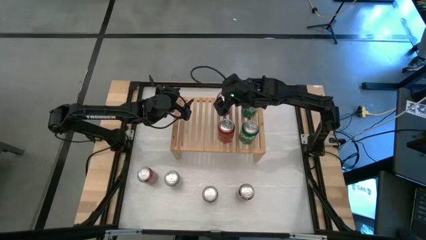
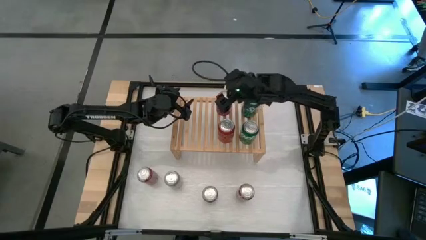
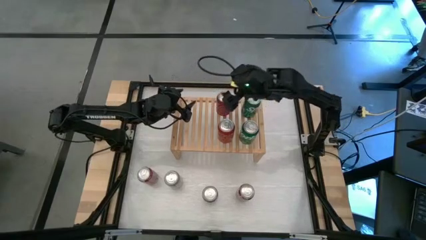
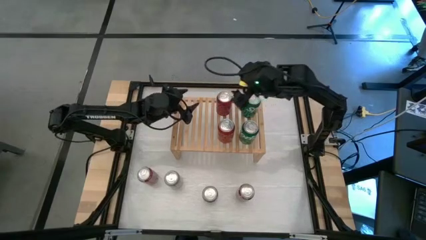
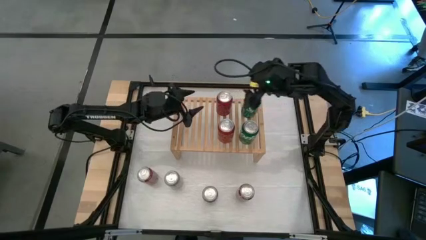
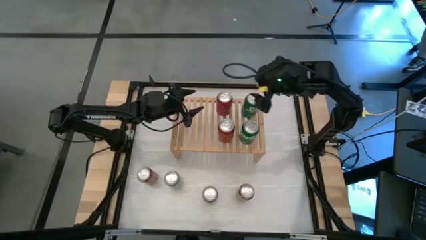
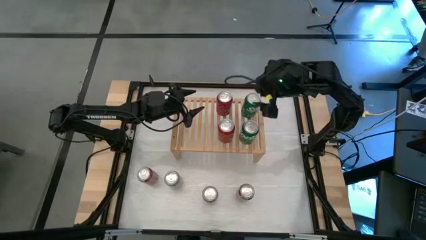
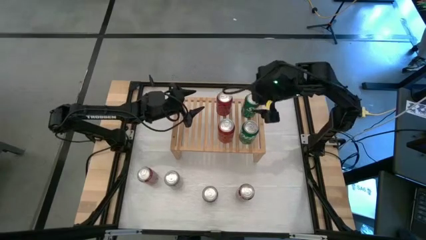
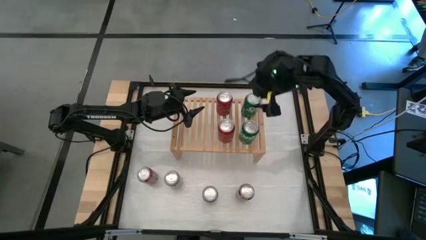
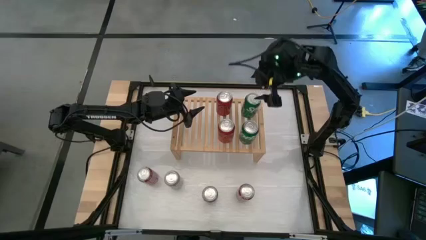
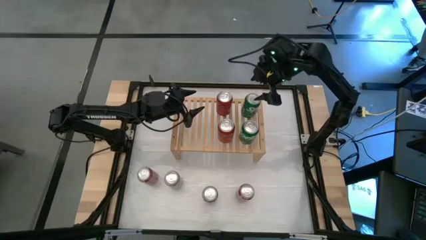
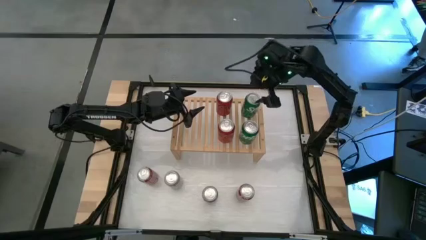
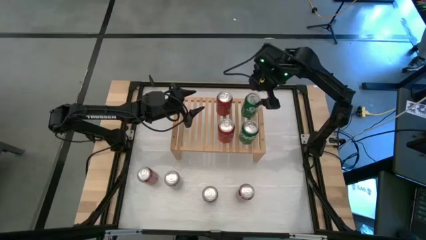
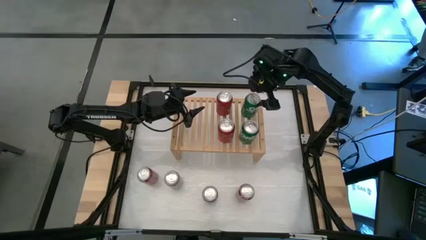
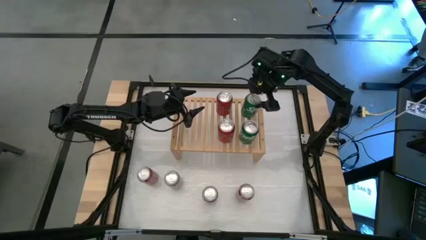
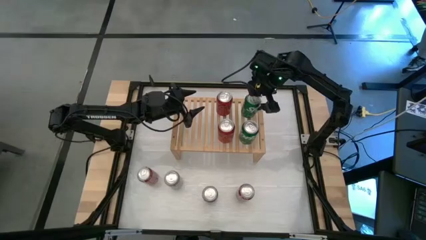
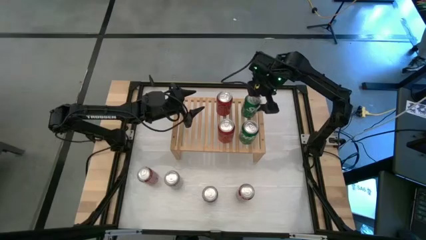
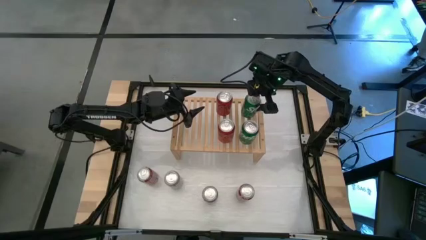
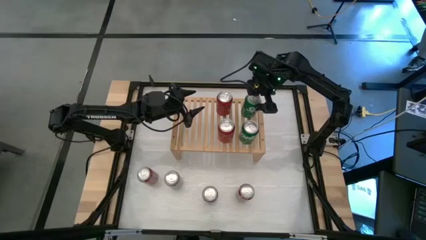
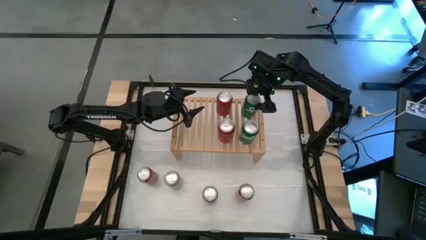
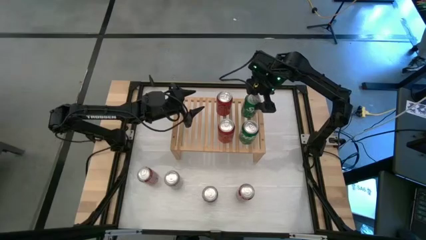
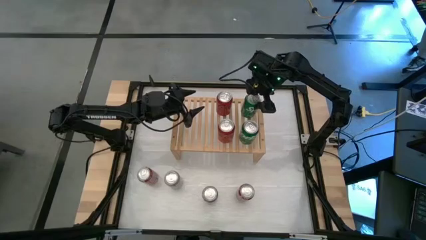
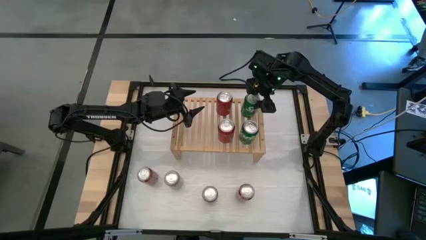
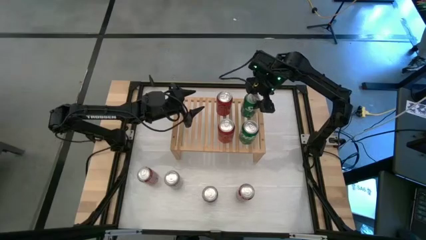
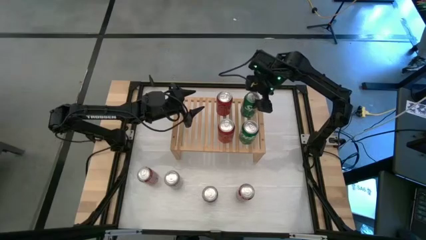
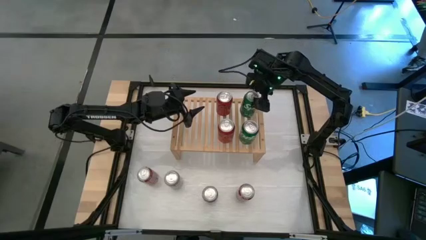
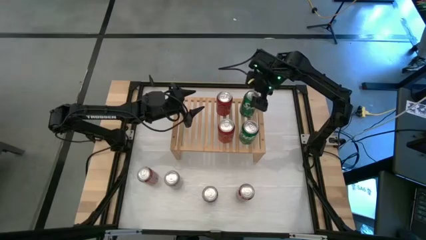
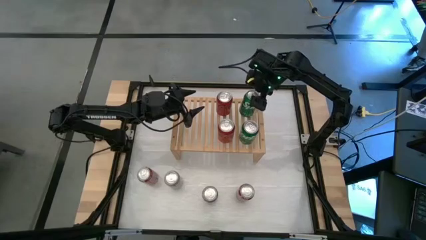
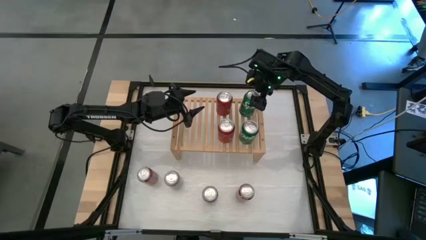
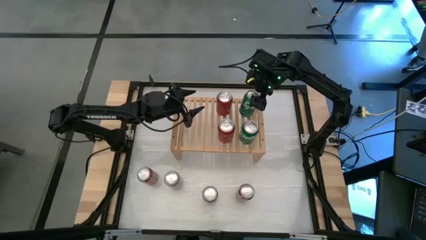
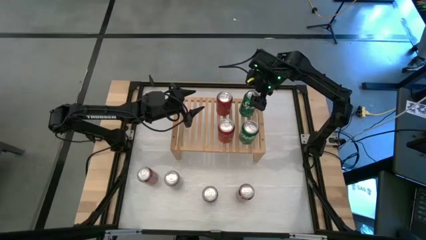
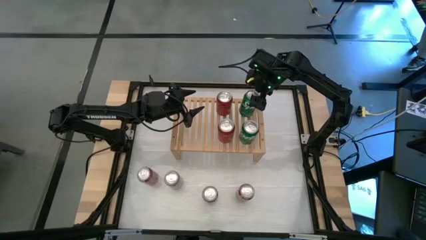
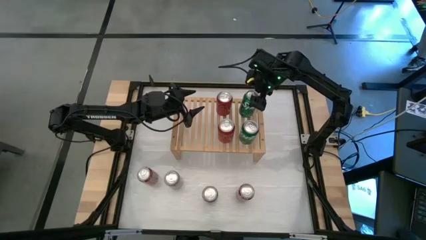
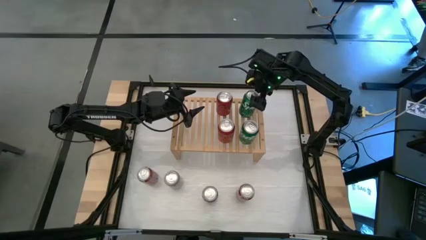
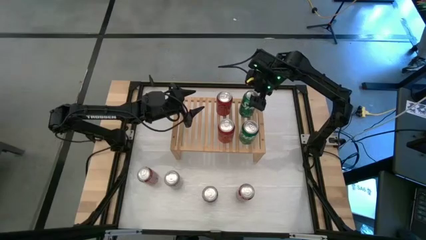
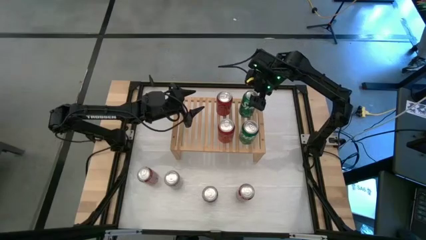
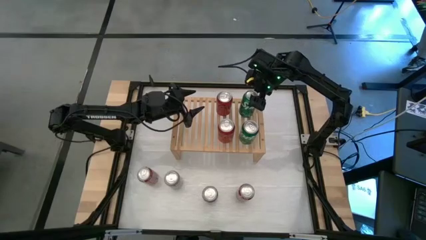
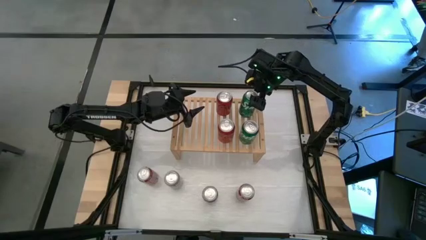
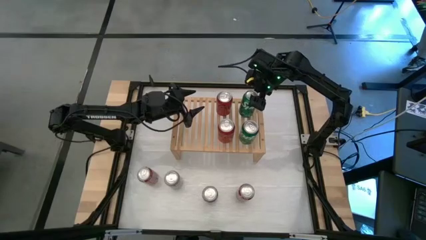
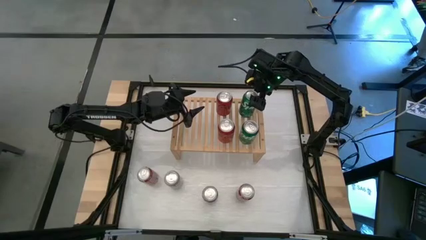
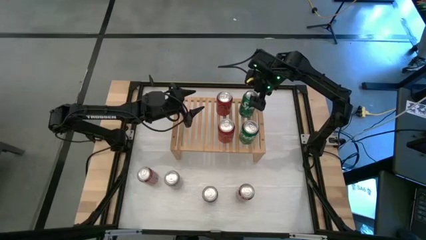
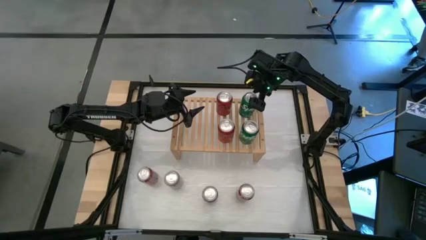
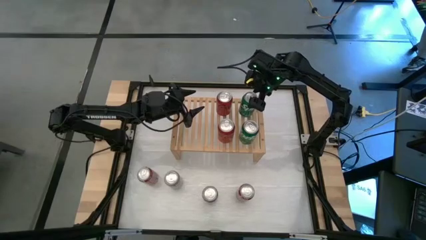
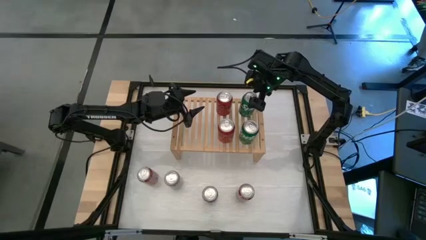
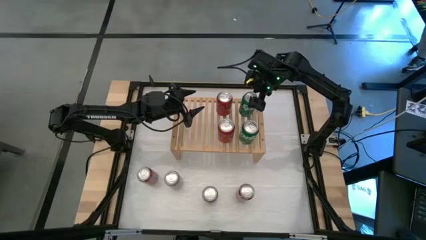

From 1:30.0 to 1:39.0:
Task: Place canned beverage on shelf
Adjust the green soda can on the shelf

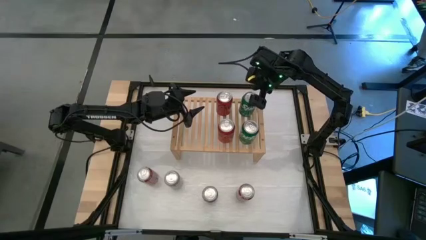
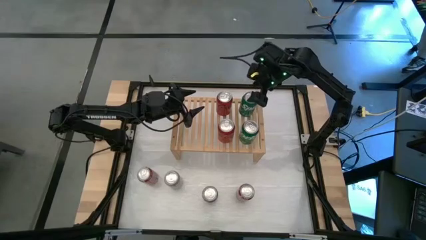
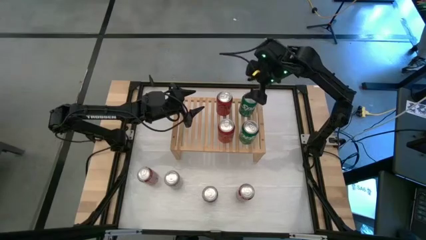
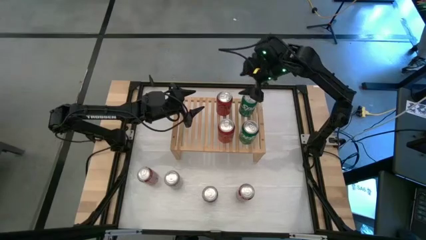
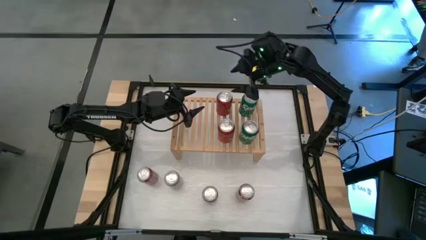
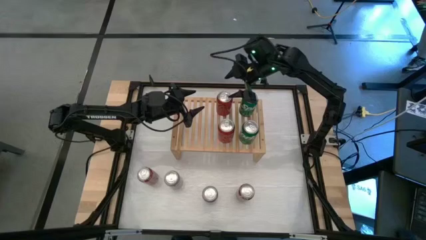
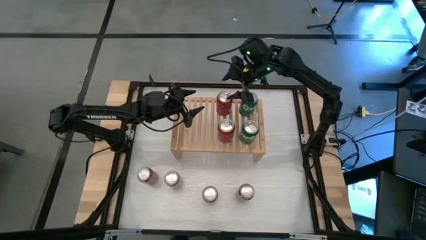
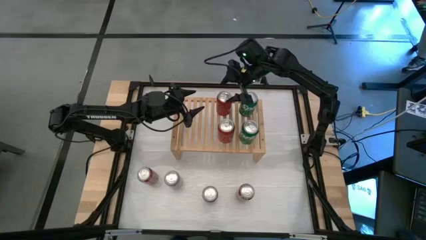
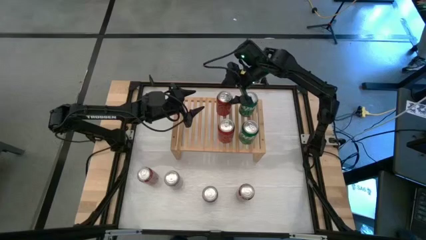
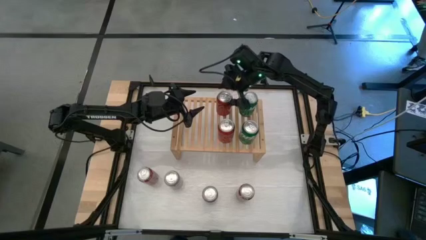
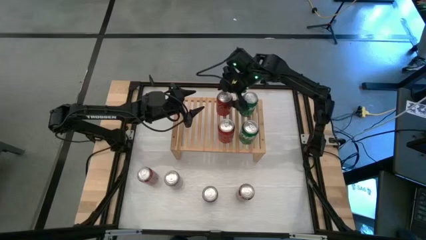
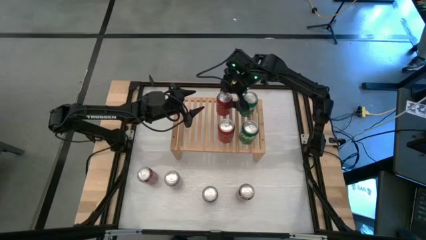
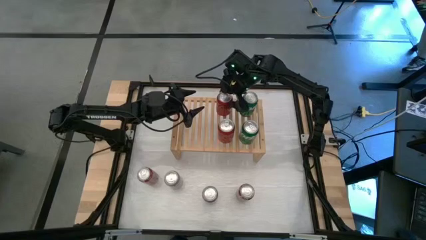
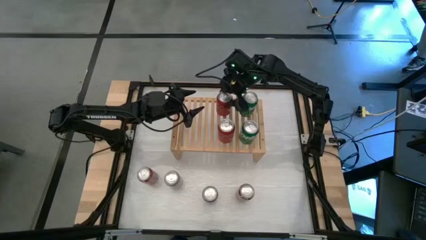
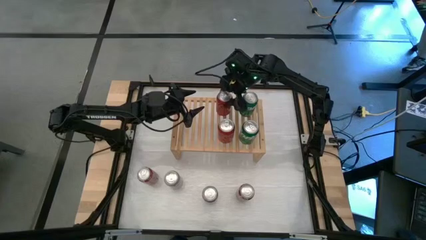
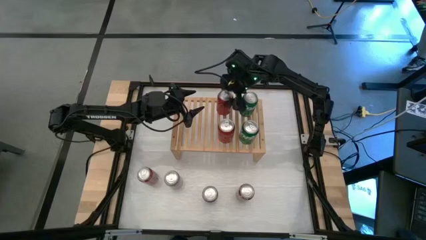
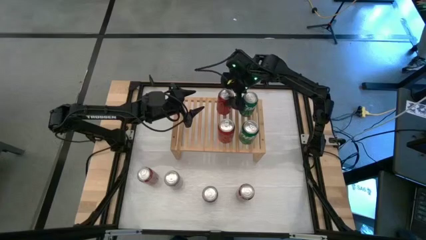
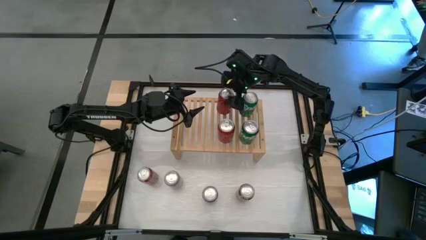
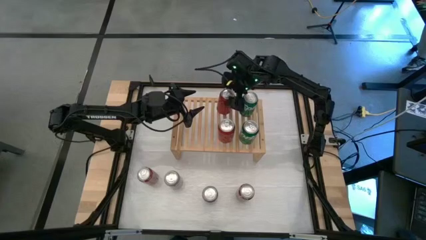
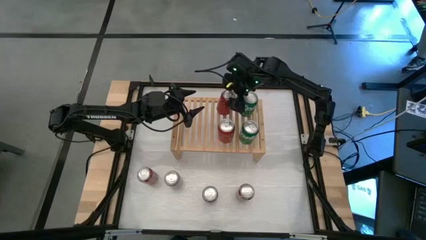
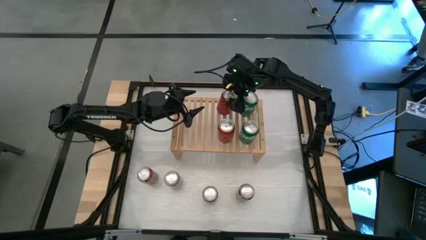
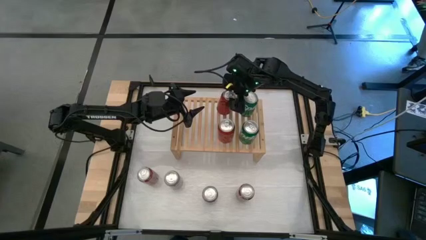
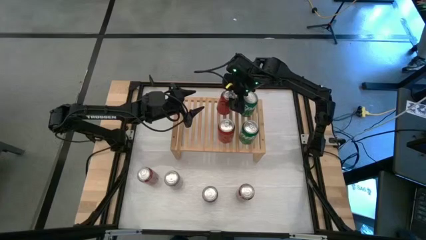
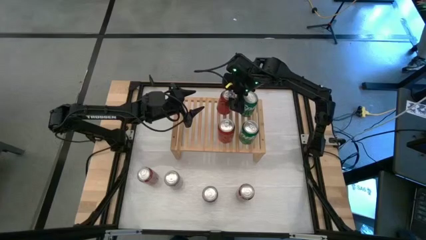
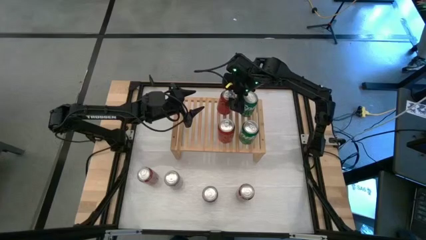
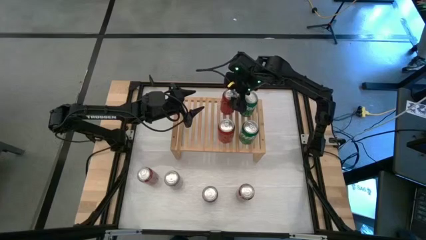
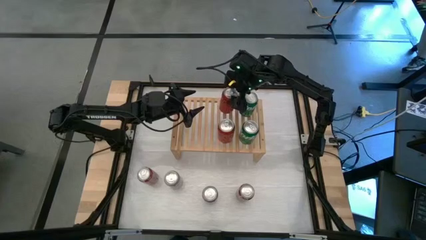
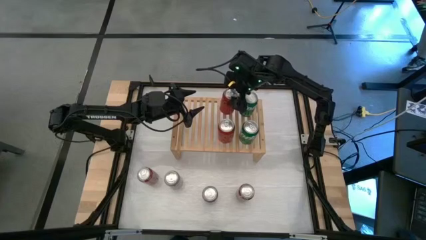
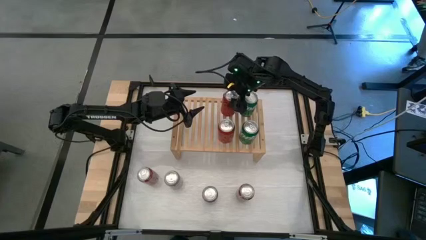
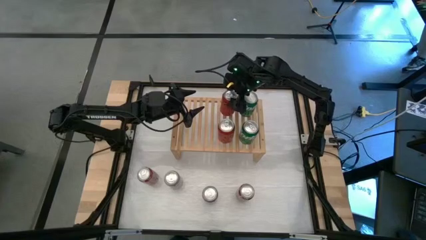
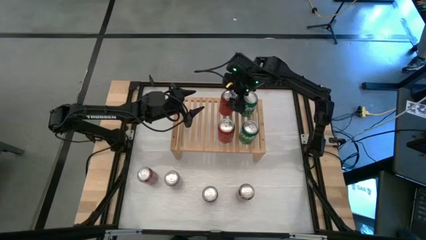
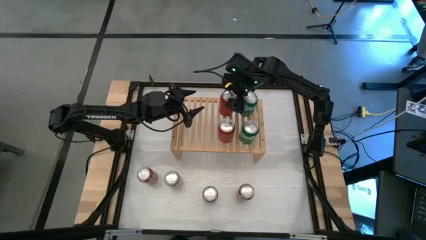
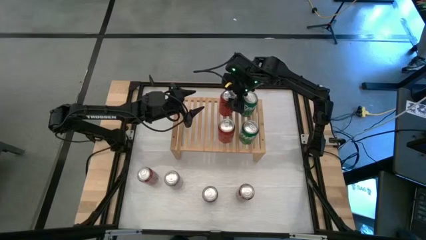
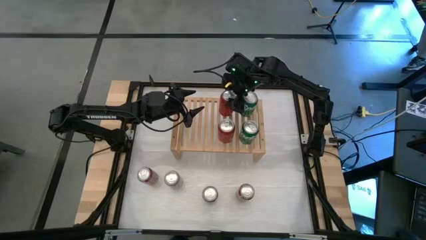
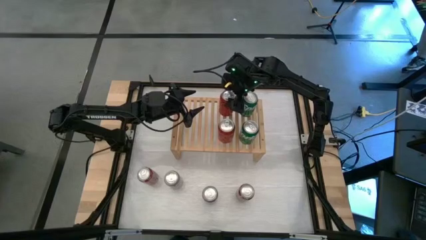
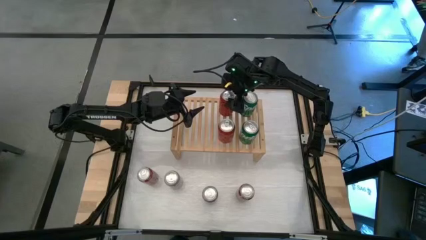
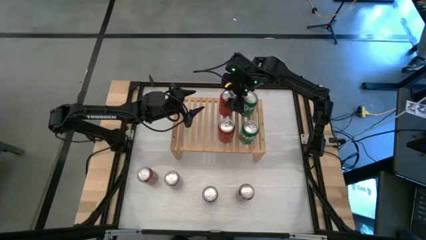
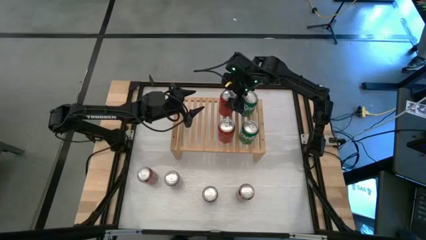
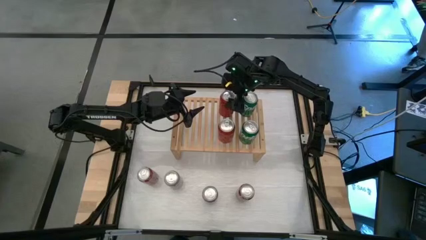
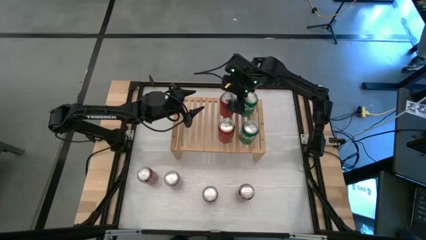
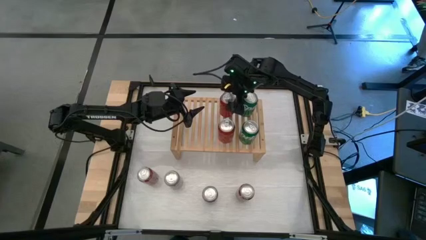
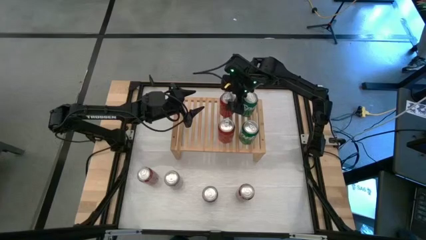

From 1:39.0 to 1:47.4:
Adjust the black red soda can on the shelf
